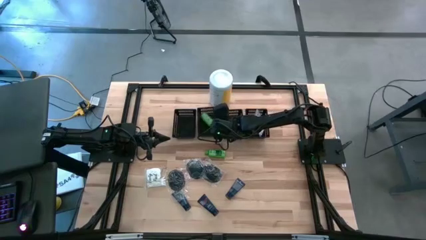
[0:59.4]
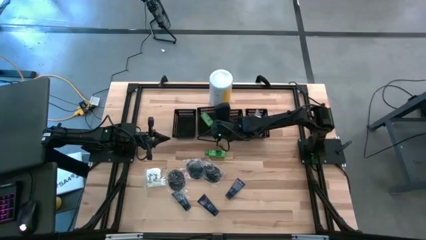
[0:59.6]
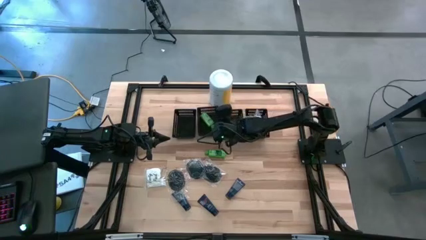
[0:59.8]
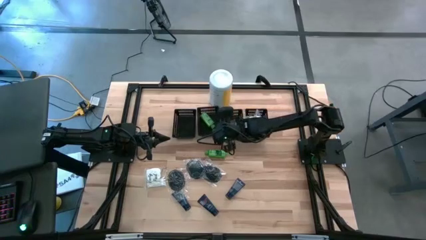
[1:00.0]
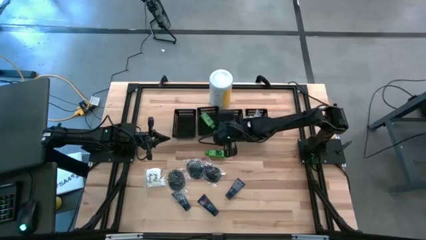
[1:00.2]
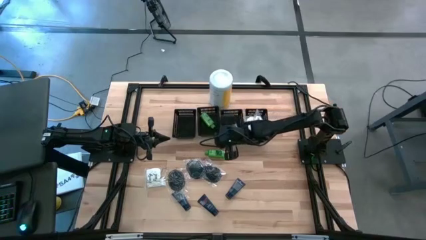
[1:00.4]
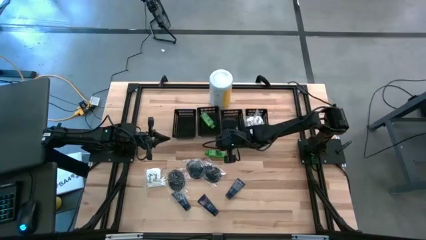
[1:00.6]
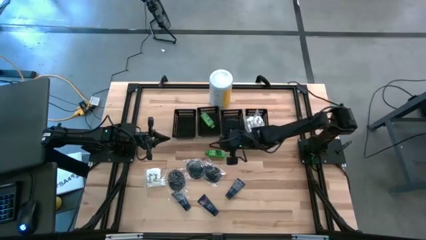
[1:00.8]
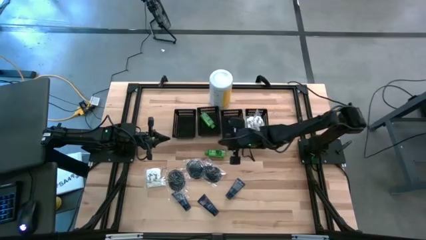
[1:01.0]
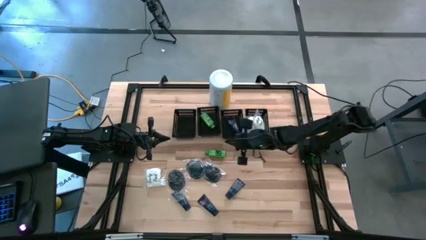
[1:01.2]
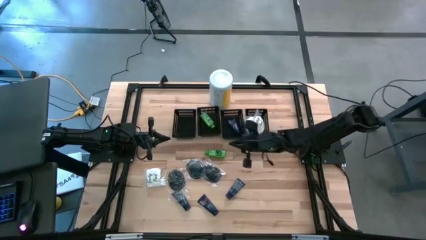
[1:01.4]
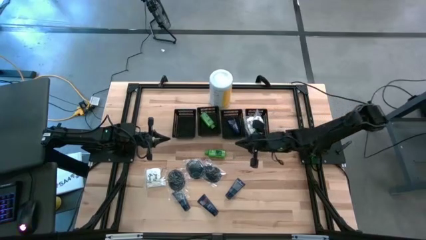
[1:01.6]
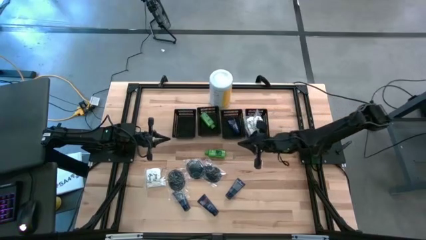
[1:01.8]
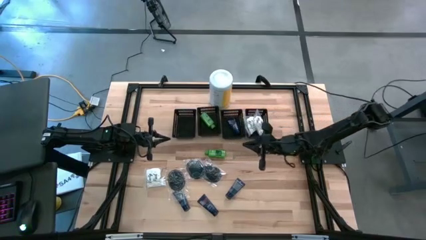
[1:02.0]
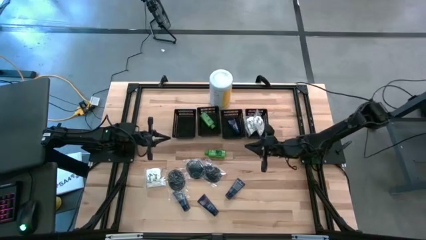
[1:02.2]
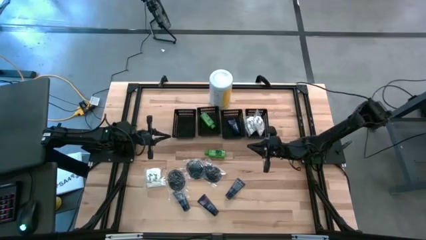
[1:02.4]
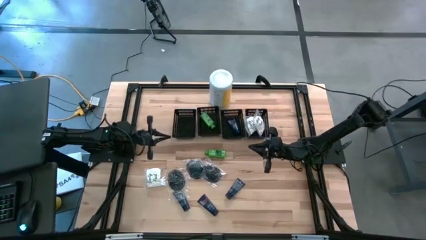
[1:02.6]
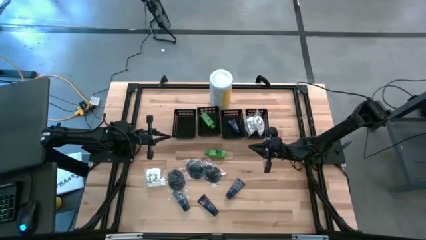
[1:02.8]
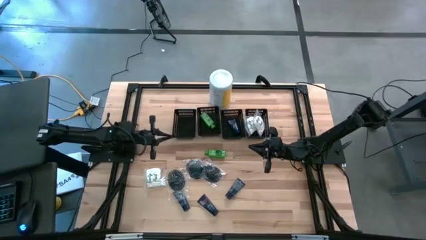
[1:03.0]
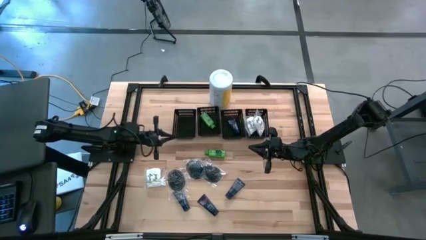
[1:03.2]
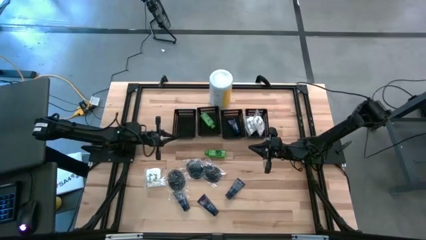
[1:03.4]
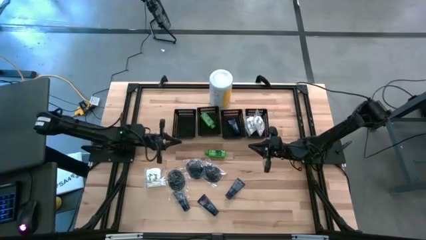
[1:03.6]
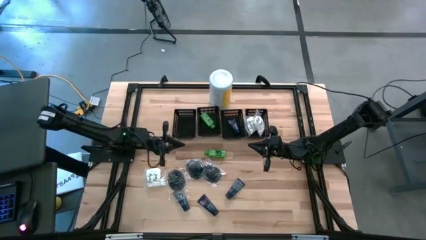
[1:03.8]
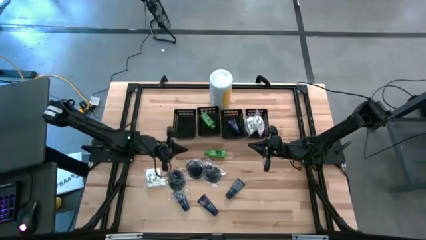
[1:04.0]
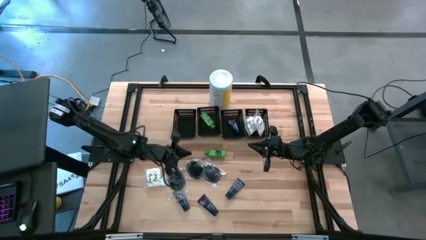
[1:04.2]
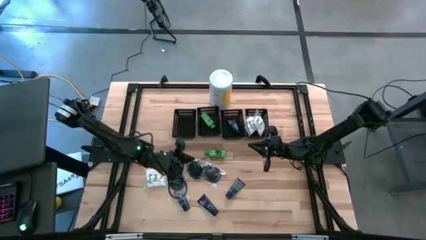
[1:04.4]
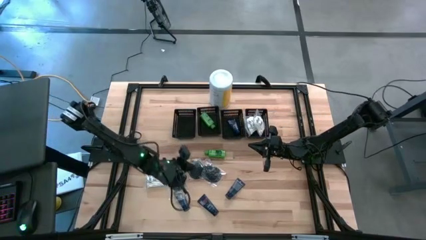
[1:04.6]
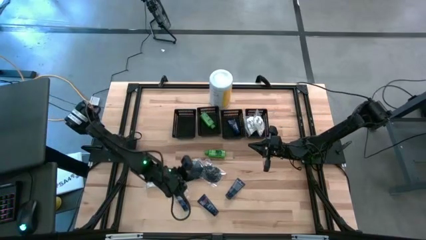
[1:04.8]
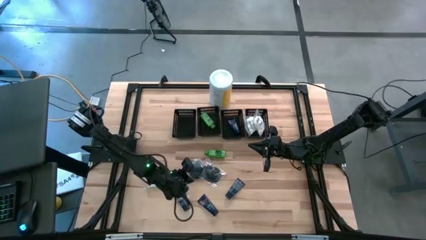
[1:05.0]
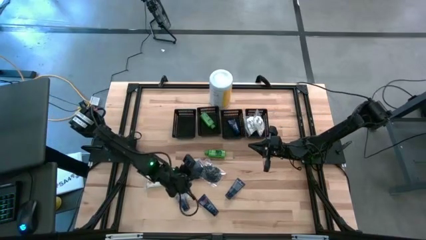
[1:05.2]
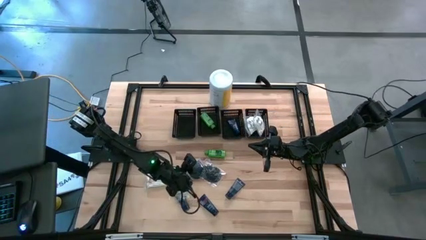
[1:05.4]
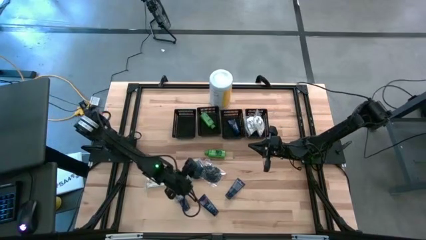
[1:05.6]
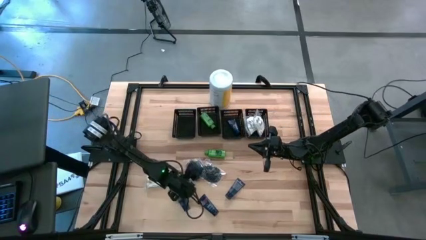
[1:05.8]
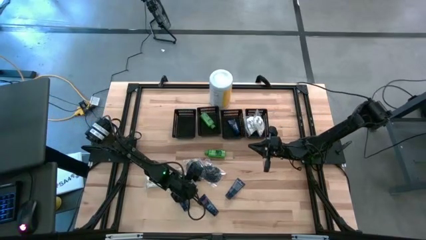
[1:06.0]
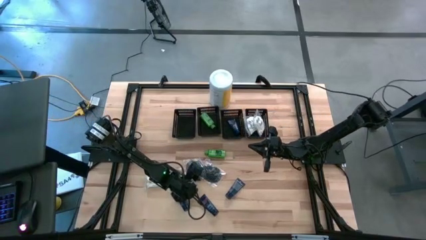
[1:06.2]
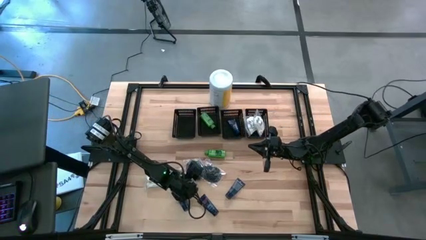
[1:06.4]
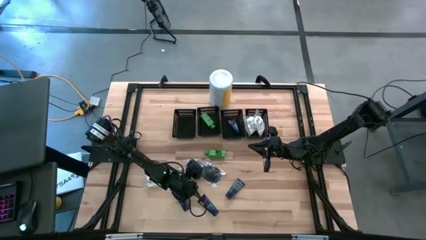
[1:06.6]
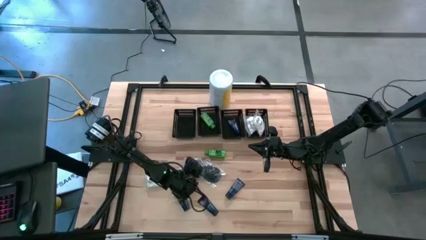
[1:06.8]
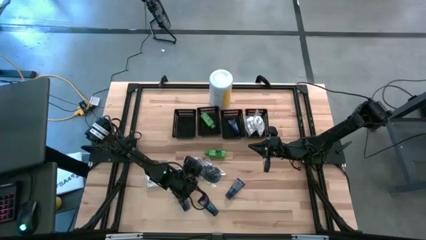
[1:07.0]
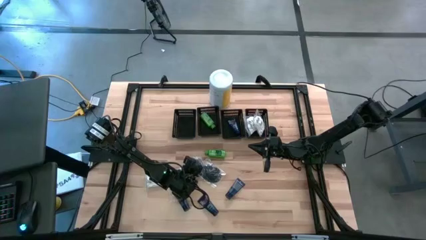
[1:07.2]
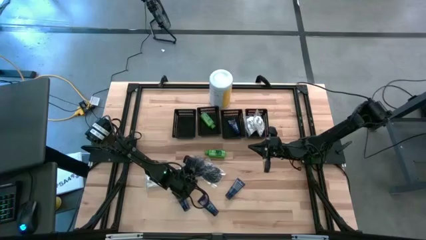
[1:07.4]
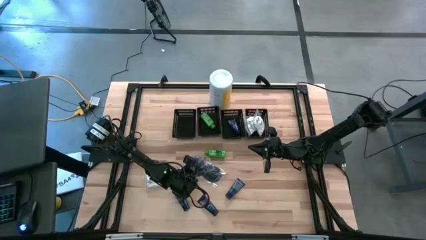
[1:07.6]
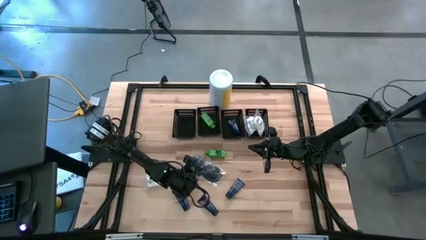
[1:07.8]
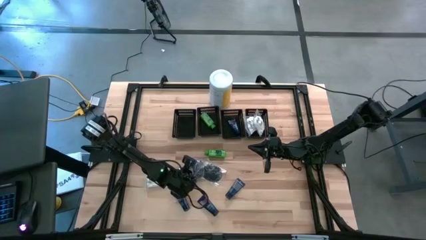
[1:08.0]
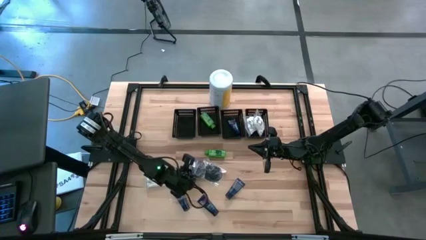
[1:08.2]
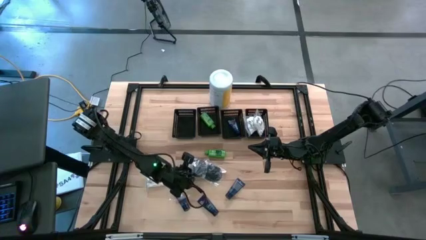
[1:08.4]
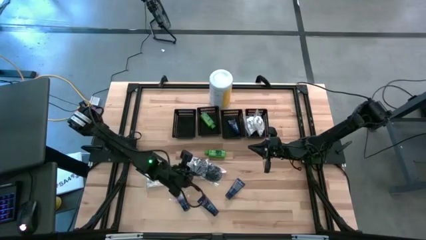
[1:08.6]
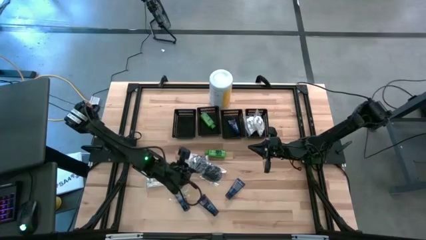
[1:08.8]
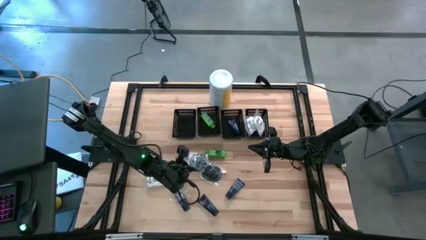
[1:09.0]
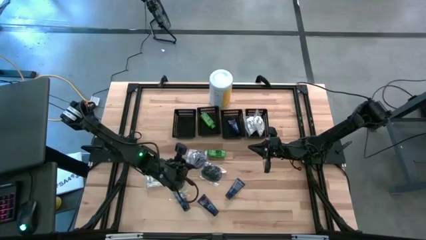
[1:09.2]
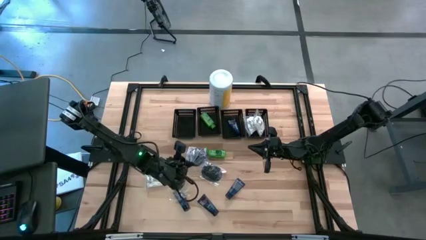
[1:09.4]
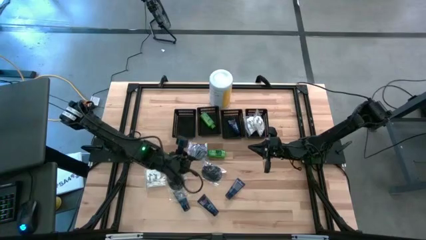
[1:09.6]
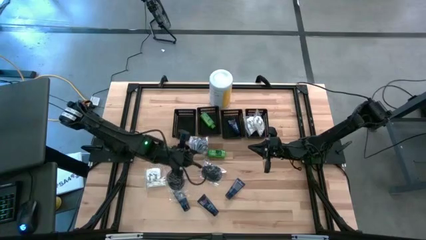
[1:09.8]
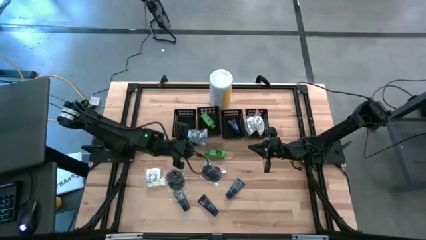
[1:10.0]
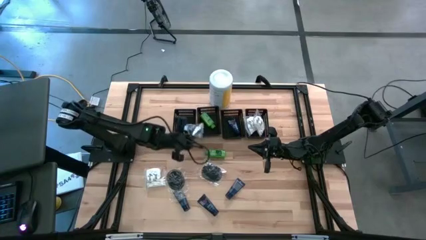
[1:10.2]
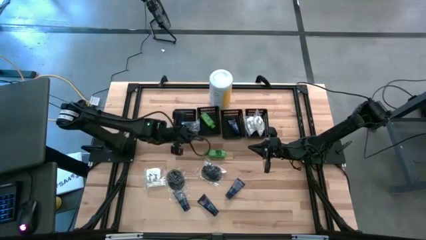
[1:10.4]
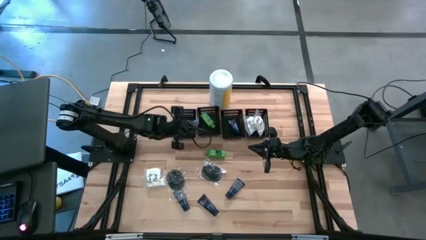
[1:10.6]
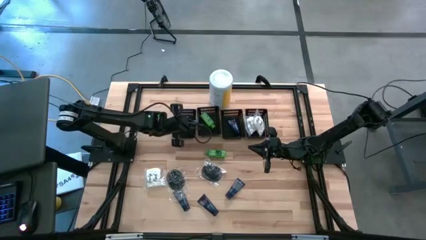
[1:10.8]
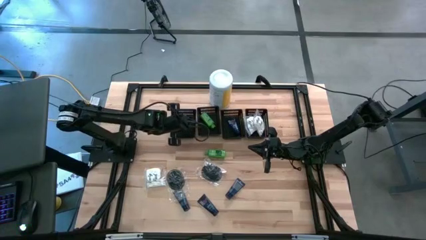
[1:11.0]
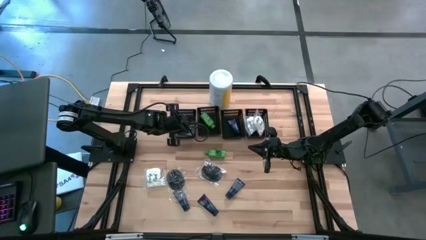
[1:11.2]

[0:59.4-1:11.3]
Task: Pick & Place Travel size toiletries
Put the middle hairbrush into the left black bin

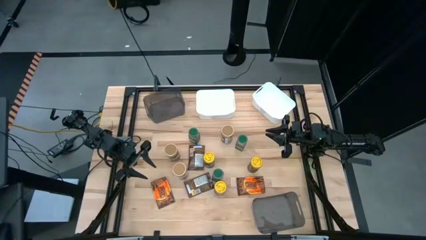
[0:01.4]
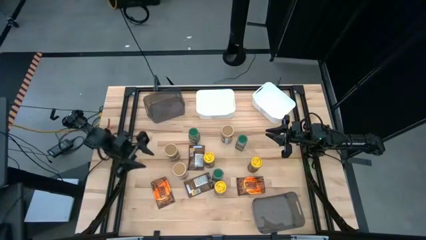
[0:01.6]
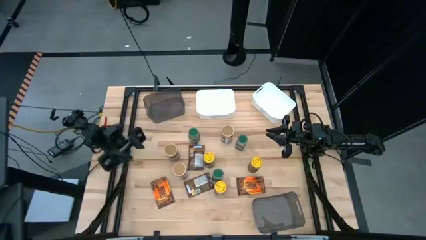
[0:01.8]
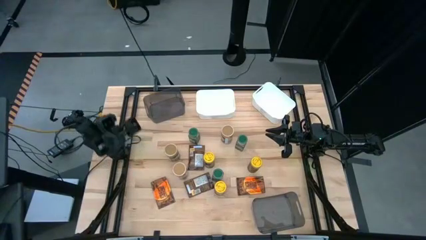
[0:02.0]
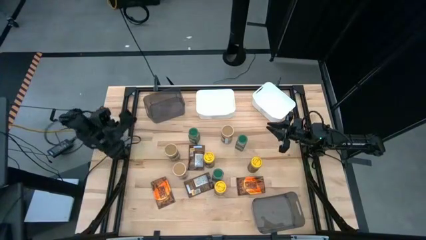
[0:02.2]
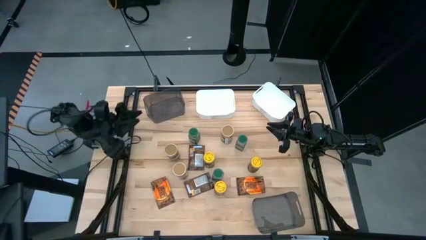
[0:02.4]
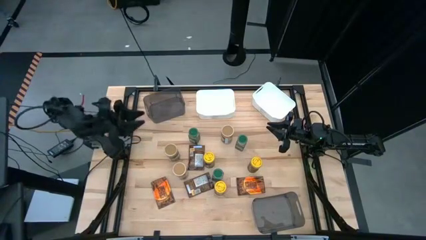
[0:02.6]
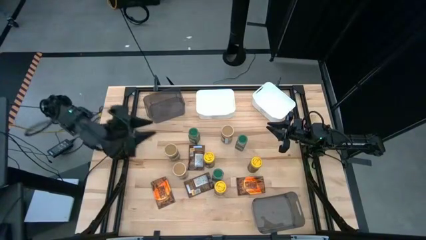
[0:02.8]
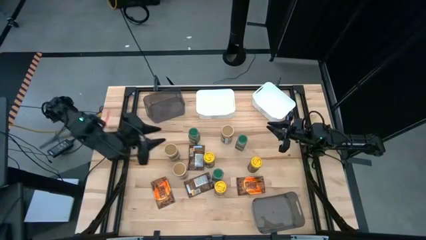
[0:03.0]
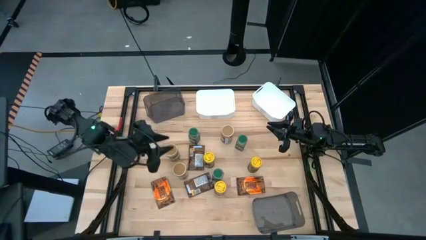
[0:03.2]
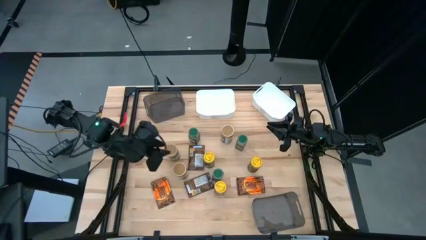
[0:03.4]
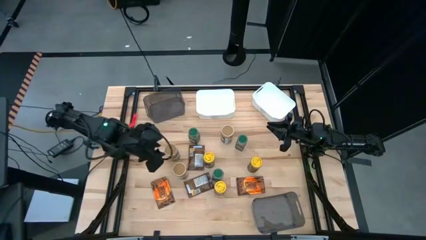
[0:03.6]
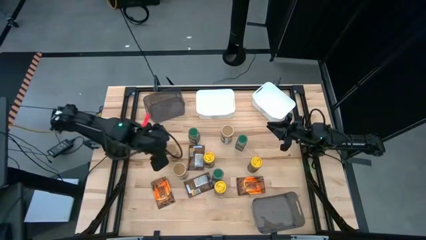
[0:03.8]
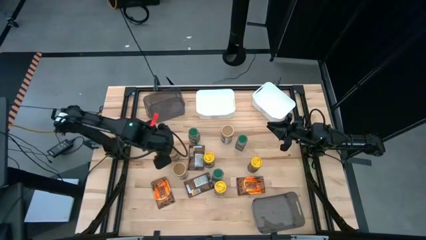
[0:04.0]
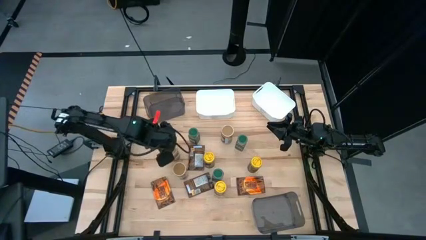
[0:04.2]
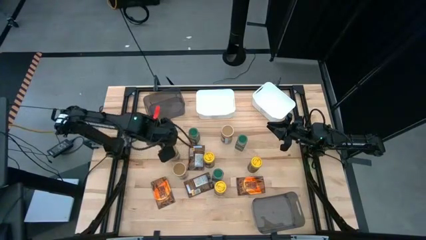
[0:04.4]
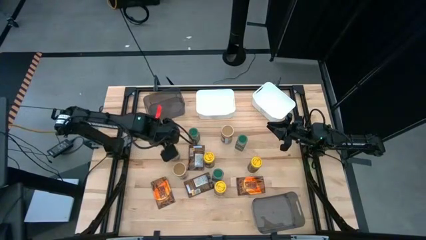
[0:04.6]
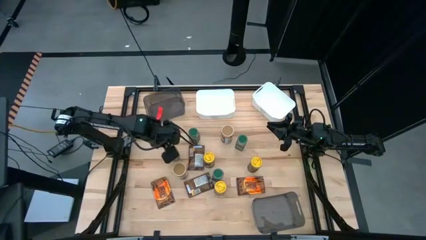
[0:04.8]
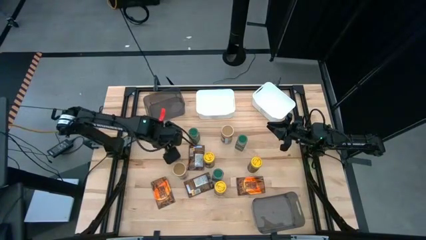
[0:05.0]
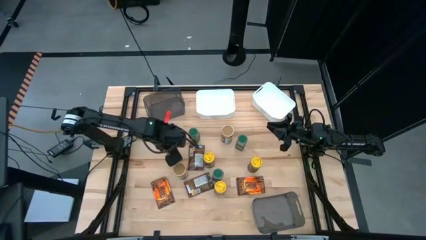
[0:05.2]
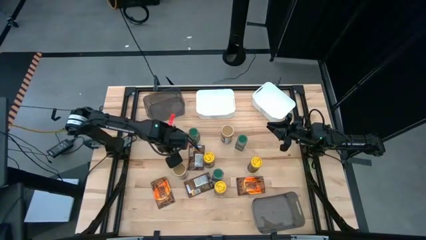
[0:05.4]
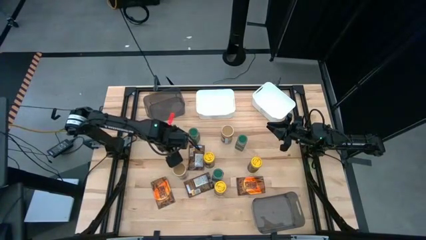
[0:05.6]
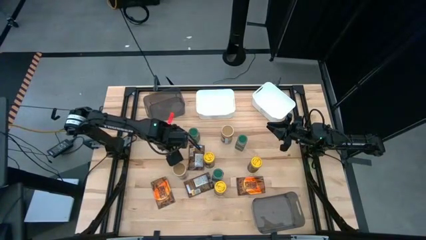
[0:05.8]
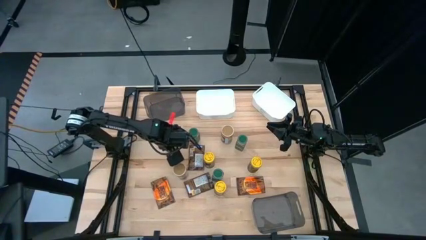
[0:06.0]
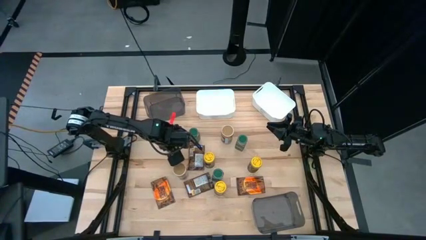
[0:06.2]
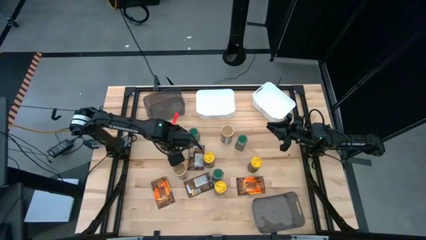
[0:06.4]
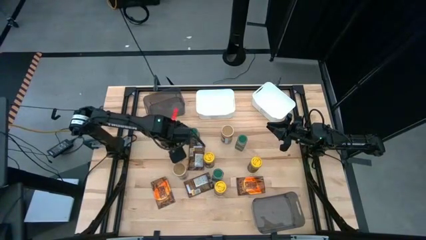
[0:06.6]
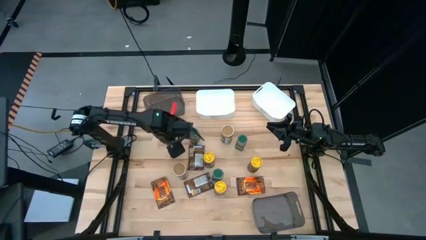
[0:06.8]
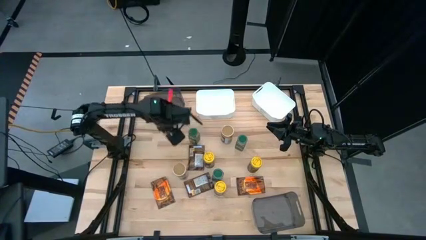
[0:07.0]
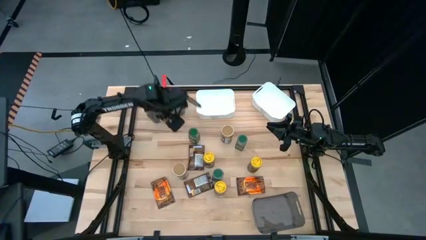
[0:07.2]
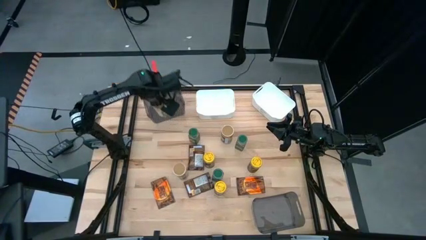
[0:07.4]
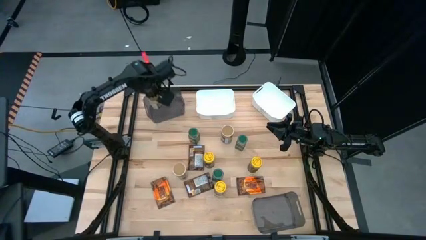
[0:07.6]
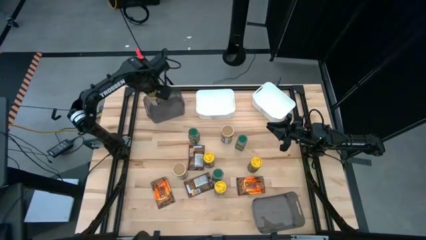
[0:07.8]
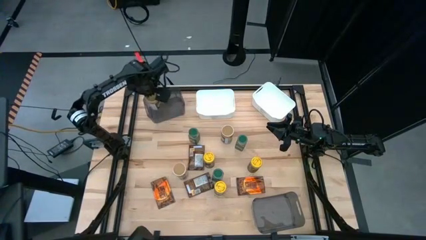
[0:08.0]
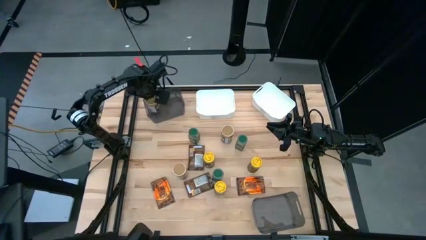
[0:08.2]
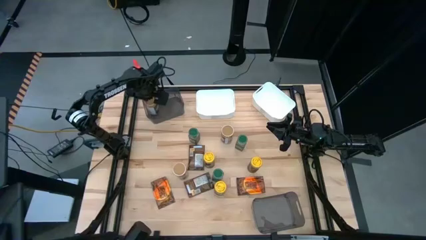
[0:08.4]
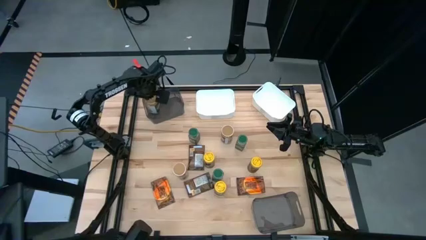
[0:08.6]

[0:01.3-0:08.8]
Task: Sort spices by type
Put the gold seasoning bottle into the top black bin
